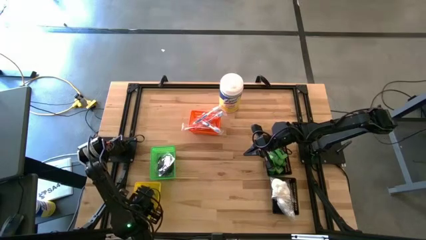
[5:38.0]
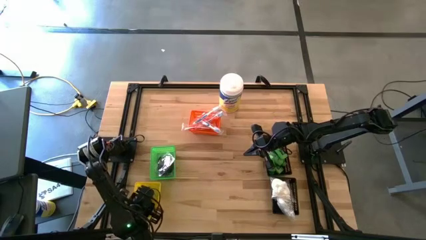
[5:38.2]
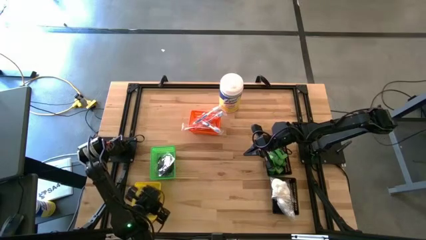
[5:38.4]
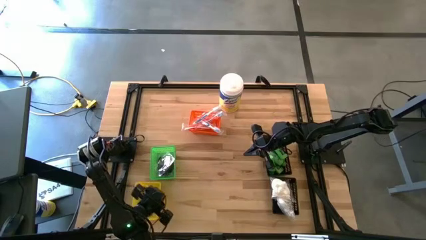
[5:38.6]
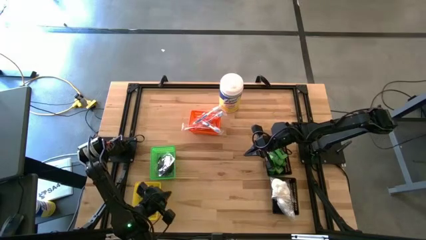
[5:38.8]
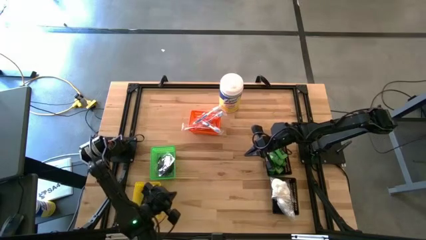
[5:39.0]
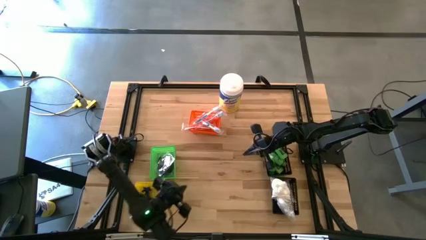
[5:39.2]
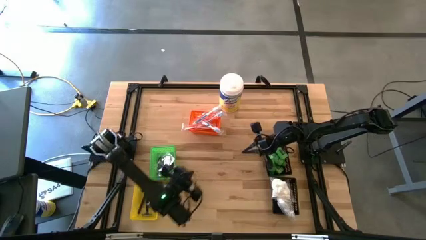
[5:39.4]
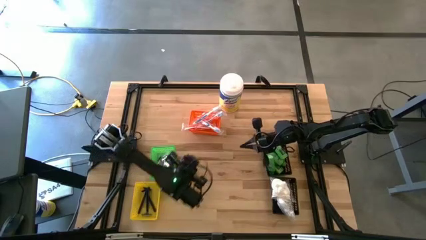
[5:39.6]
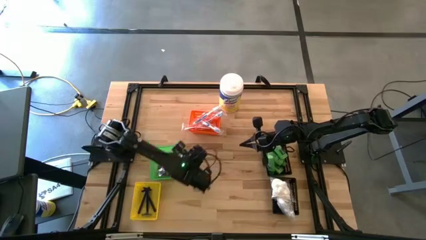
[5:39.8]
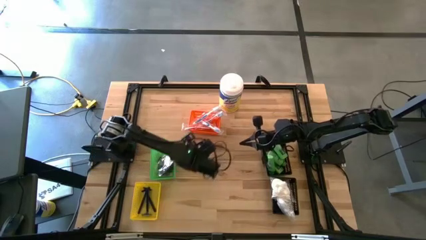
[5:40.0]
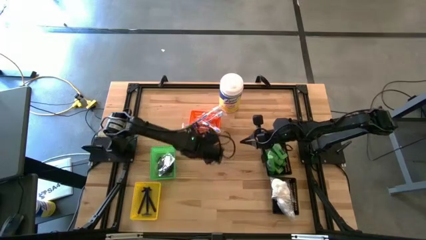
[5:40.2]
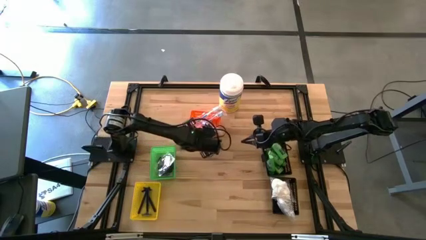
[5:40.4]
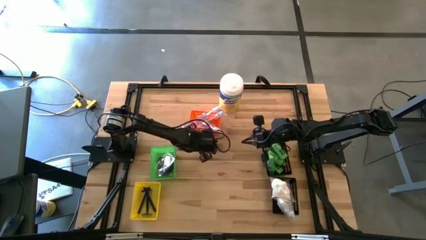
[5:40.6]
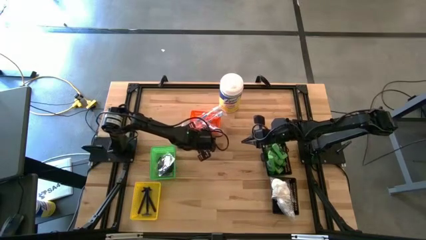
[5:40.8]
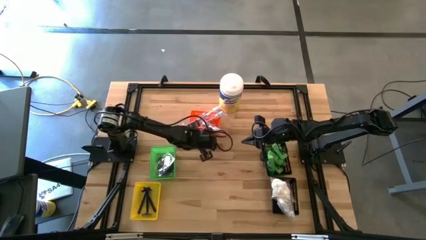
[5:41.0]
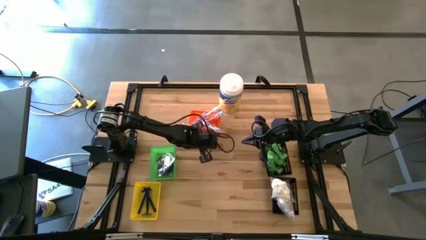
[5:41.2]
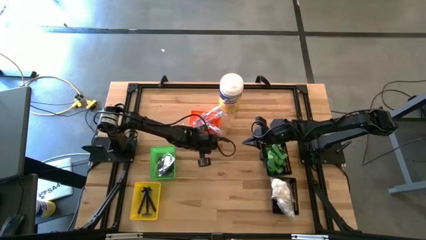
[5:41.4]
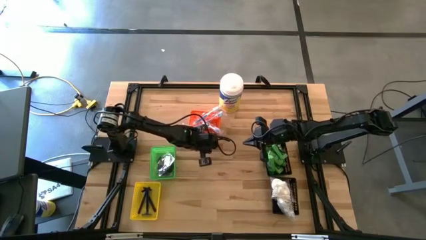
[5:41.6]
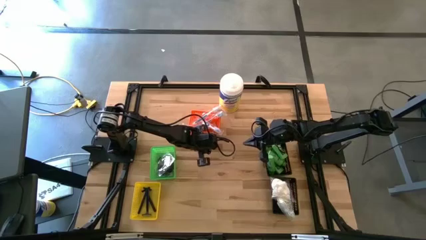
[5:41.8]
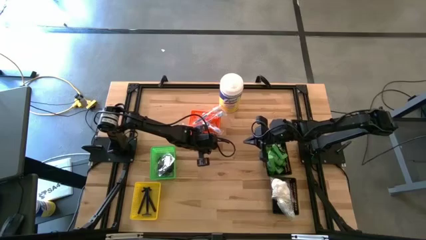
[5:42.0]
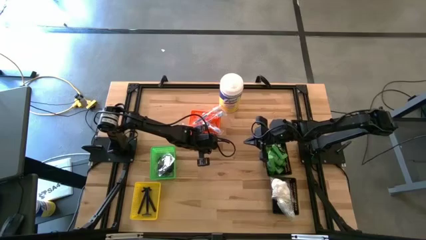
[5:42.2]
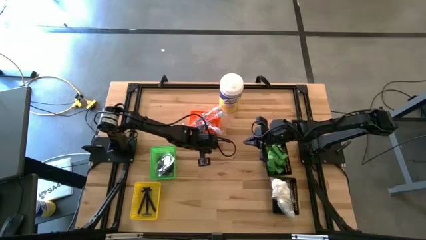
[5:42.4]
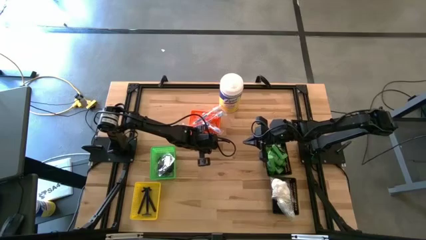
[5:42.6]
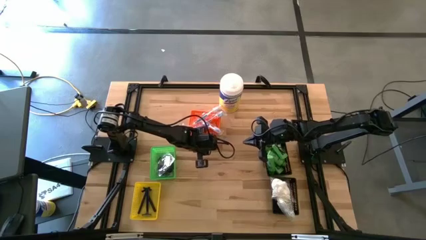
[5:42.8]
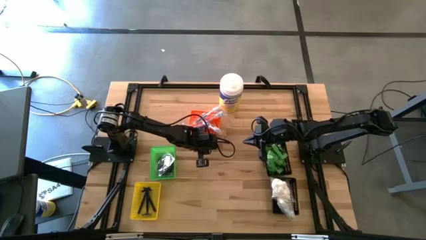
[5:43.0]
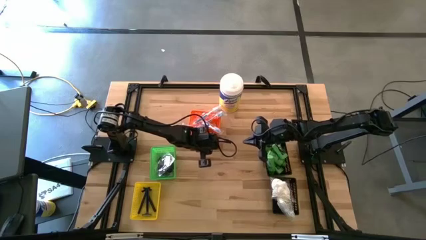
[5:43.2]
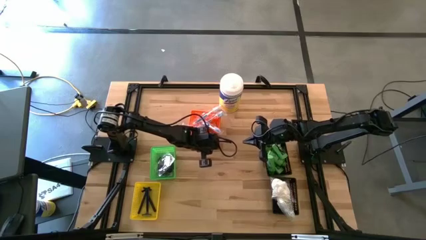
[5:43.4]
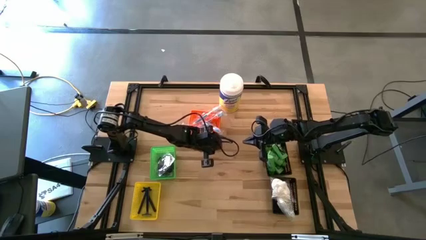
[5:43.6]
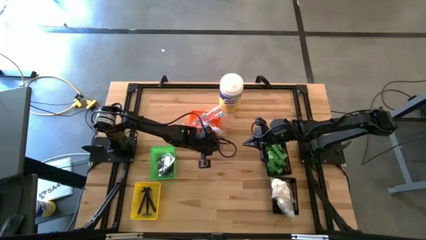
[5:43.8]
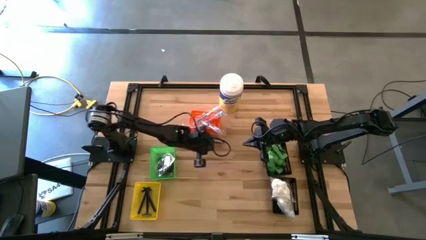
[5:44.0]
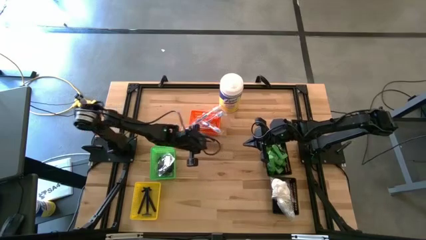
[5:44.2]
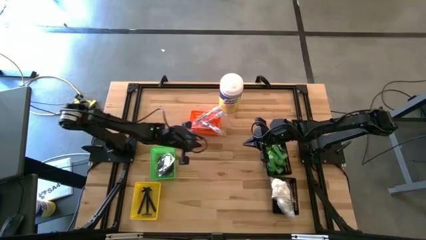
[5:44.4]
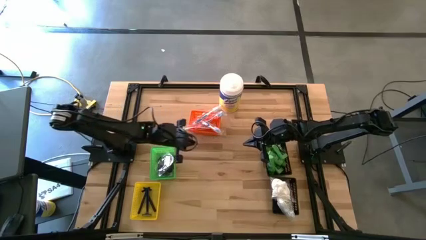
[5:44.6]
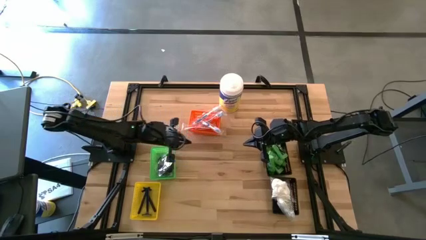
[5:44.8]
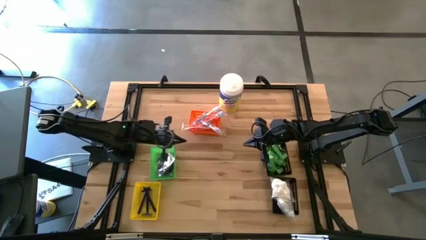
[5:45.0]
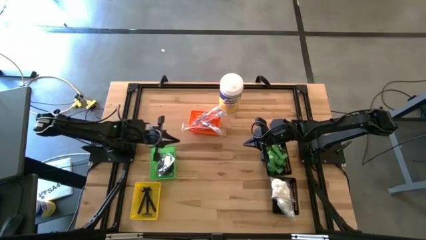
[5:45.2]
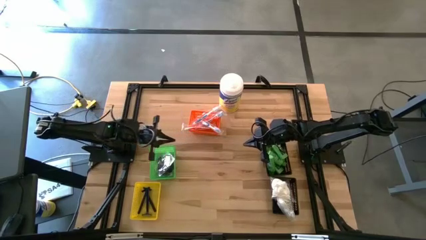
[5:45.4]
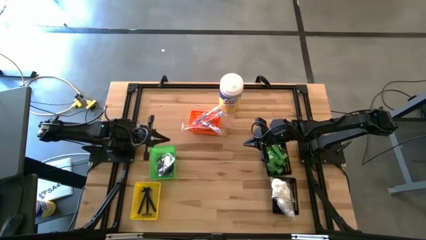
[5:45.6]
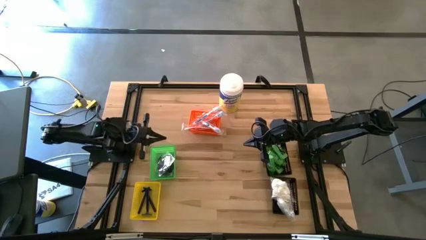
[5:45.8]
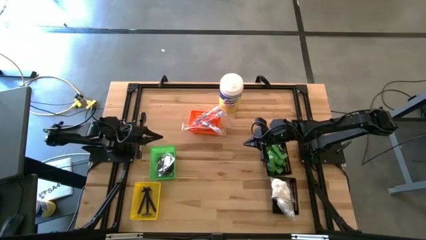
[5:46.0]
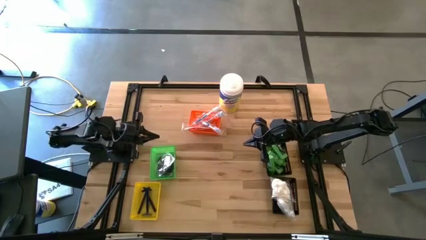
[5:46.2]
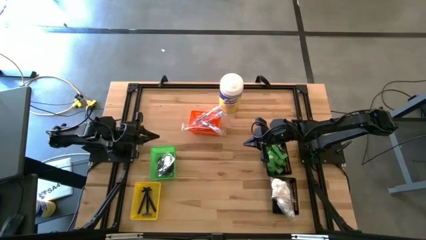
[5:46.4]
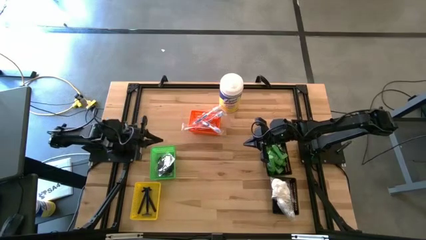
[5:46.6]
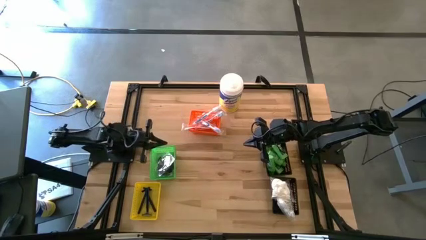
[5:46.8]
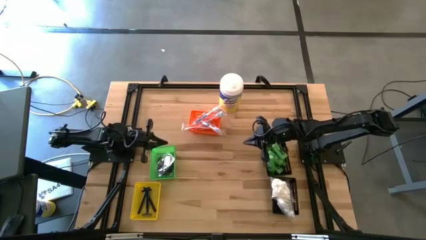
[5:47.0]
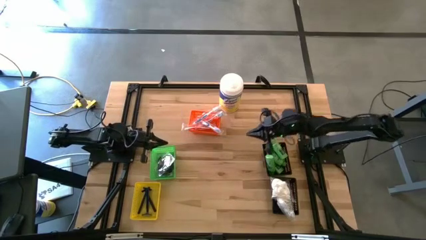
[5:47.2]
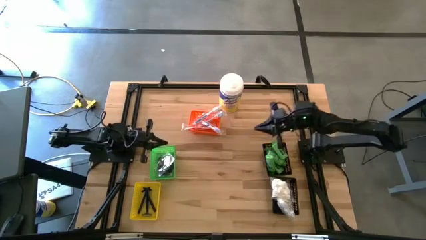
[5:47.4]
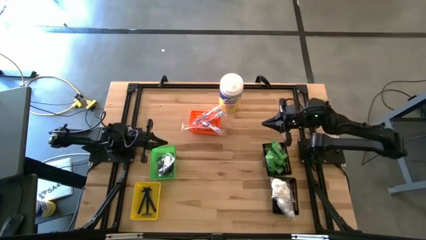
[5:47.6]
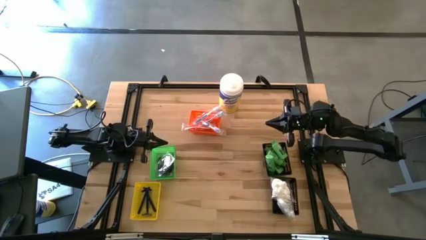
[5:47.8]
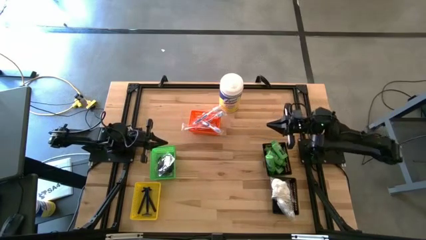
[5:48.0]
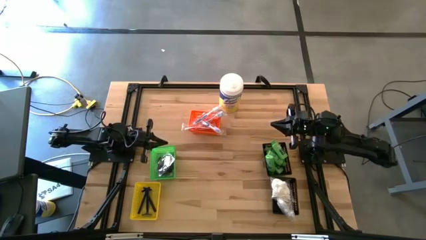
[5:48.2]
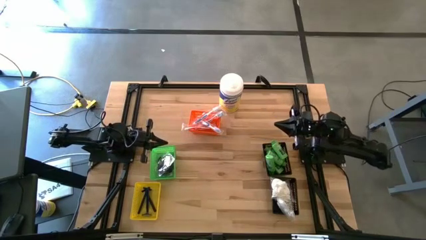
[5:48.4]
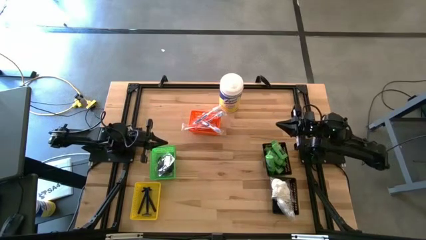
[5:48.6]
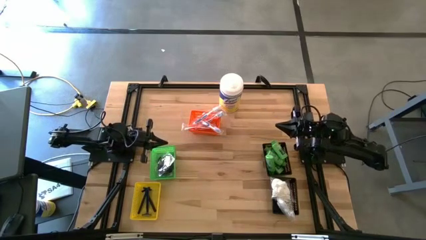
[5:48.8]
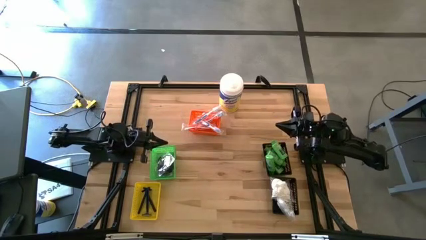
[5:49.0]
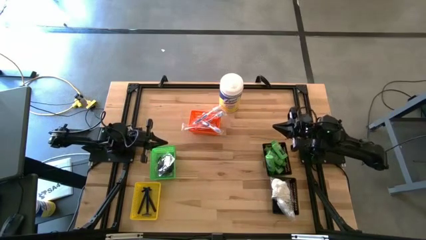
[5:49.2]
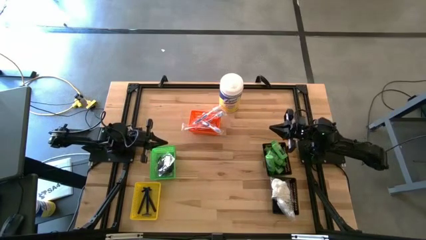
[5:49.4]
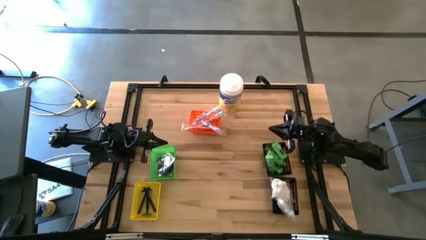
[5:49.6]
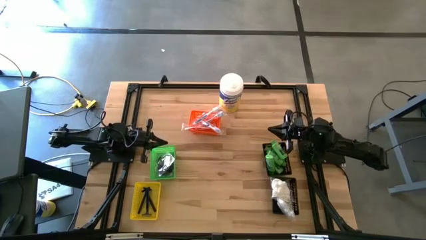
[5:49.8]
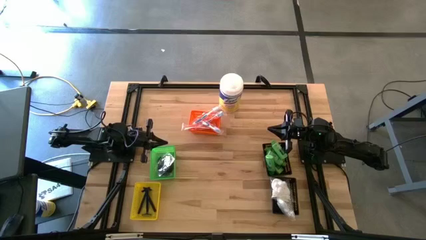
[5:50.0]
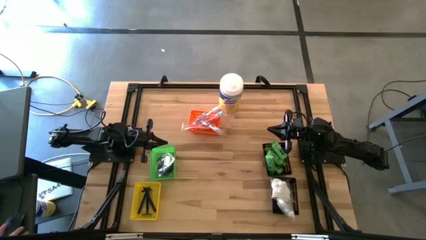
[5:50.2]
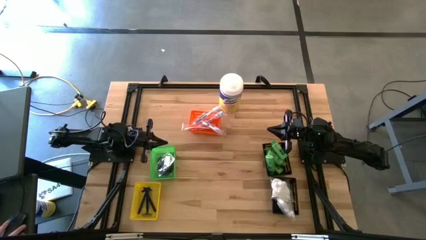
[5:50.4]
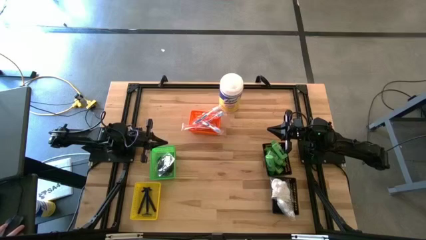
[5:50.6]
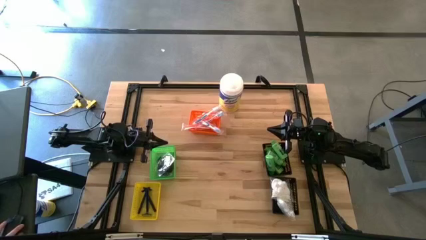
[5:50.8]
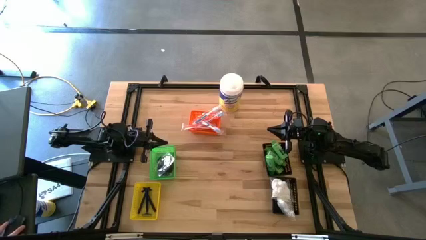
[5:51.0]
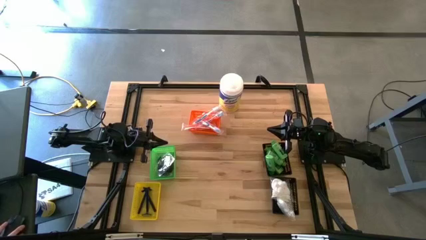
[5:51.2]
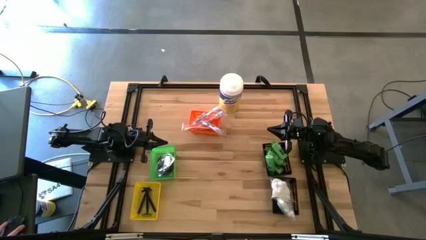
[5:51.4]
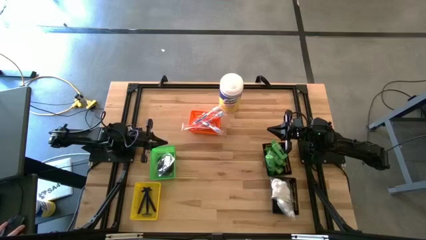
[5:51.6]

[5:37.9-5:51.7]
Task: Pick & Place Travel size toiletries
Return to Home Position

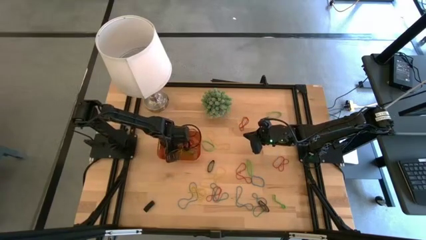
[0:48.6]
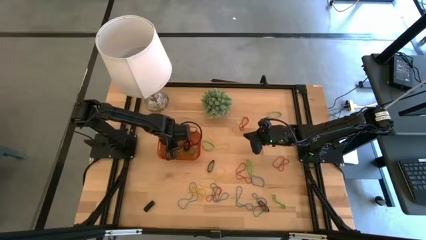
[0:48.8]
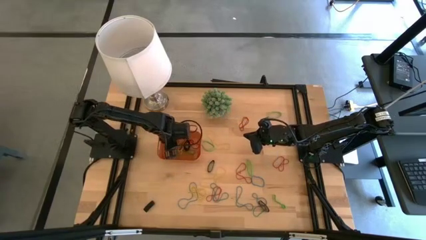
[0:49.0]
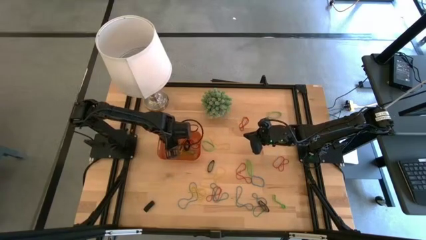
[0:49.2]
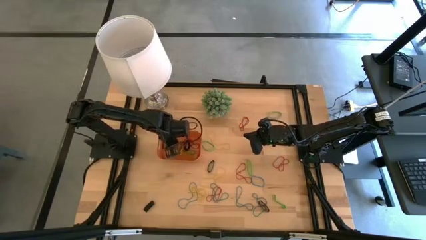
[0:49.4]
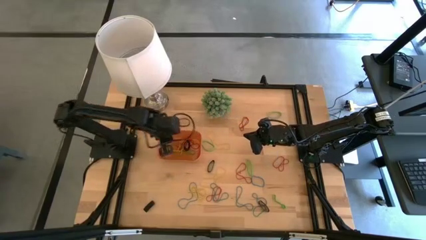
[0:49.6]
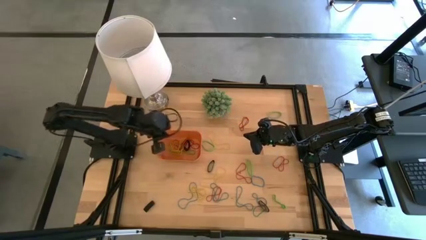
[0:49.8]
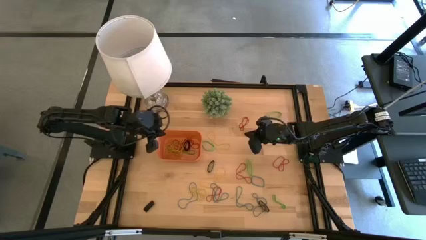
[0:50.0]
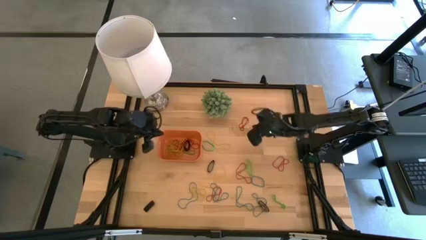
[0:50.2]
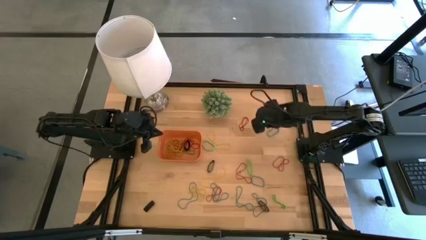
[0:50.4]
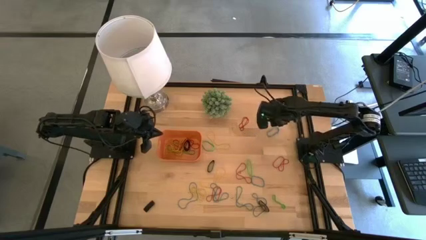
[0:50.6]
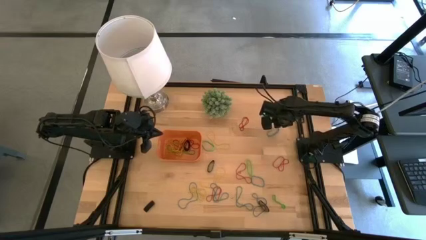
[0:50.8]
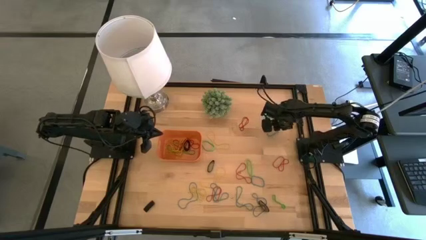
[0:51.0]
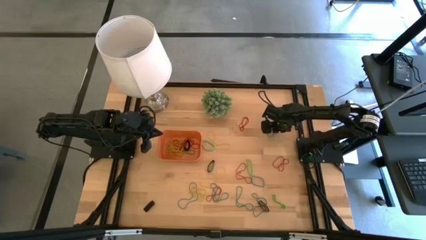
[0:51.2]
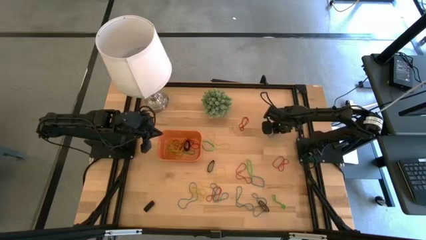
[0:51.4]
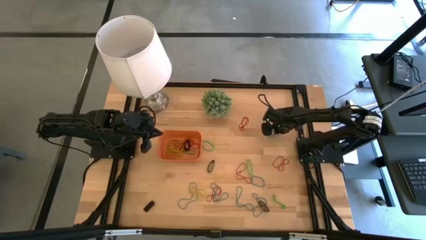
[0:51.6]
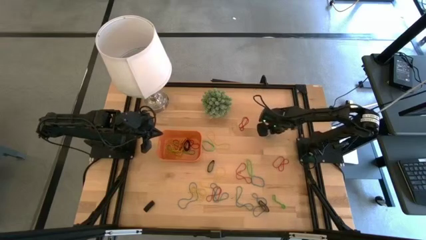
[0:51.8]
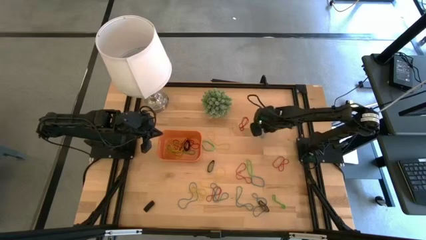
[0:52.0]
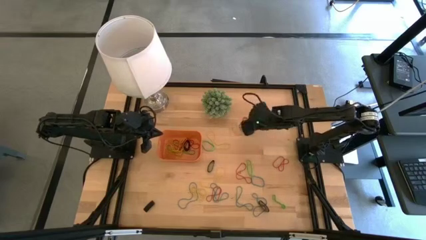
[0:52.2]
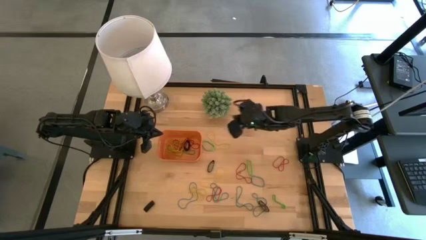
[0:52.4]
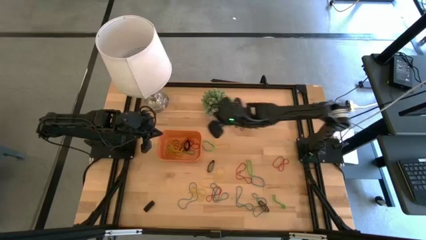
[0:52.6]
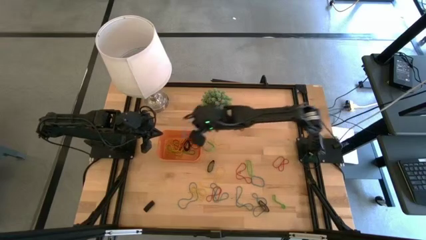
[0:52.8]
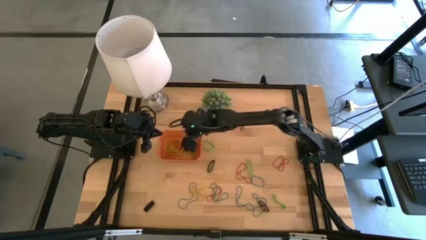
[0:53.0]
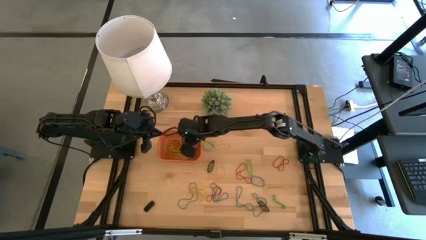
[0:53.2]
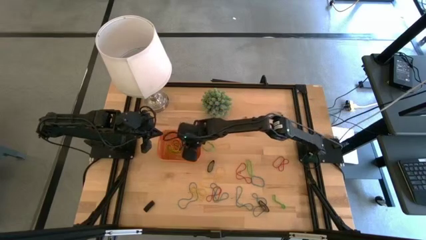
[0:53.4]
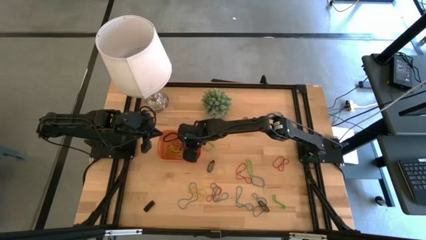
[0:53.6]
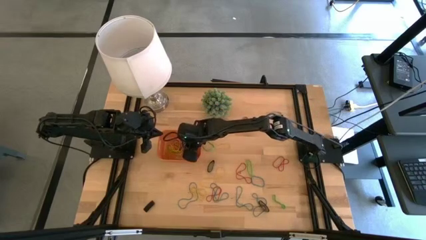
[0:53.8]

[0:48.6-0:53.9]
Task: Pick and place rubber bands into bin
Put the blue rubber band into the orange bin
